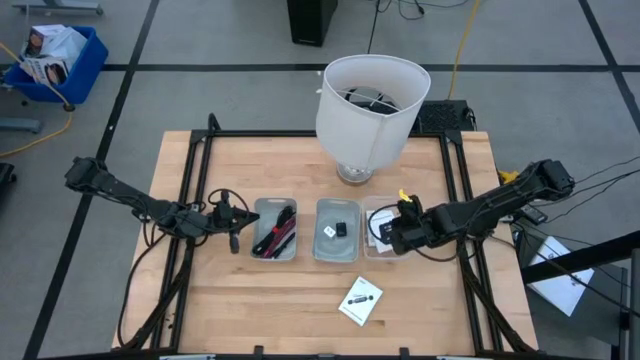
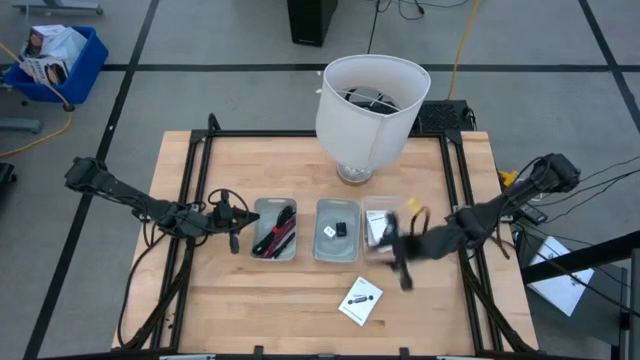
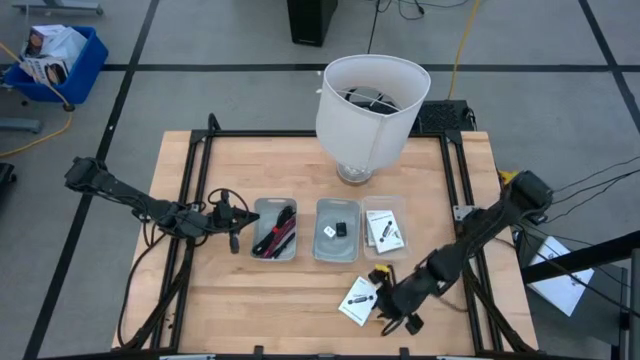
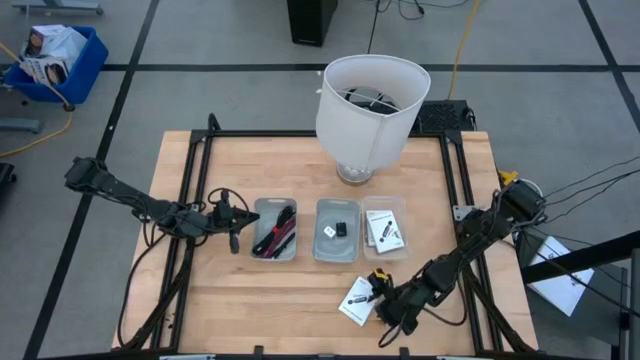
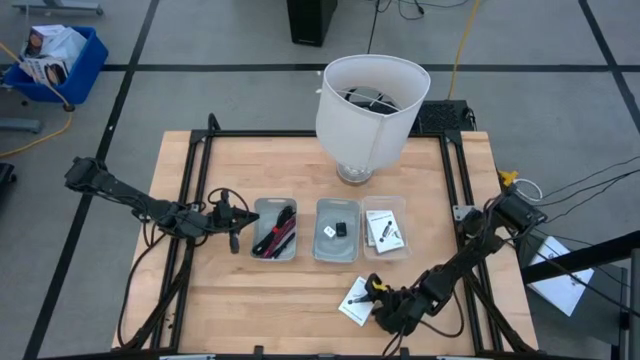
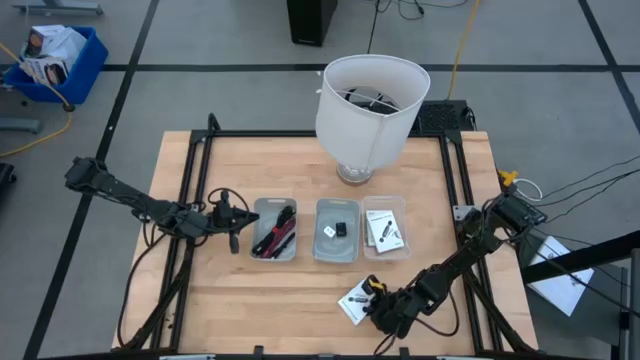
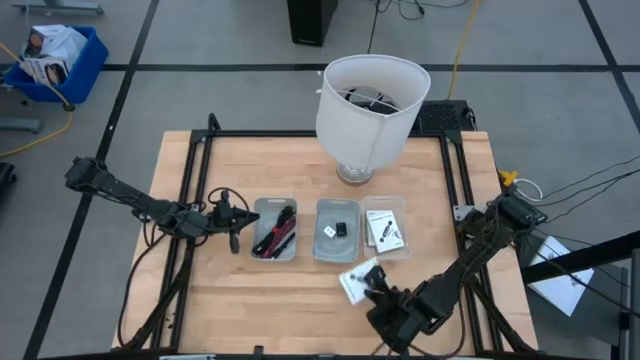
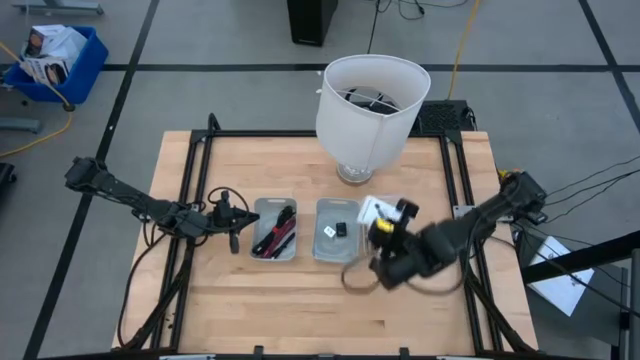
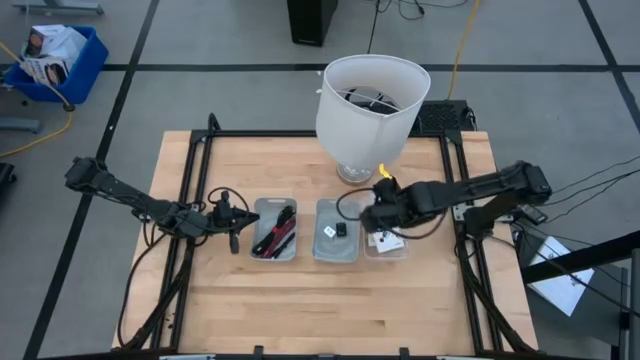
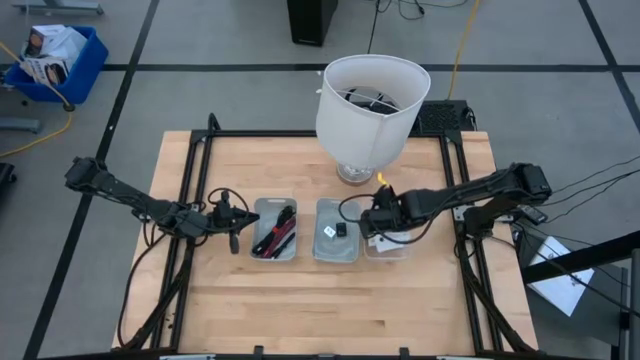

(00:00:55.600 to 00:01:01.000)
Task: Pick and place items into bin
Put the white card reader box into the transparent bin

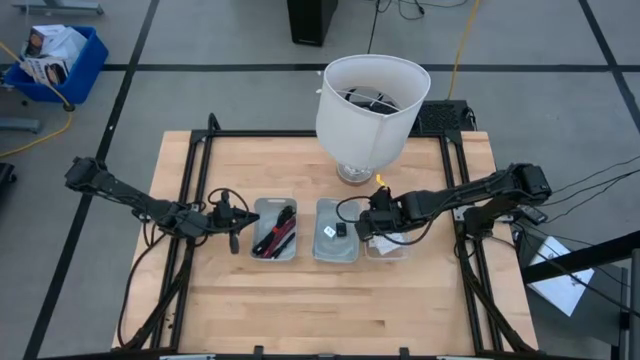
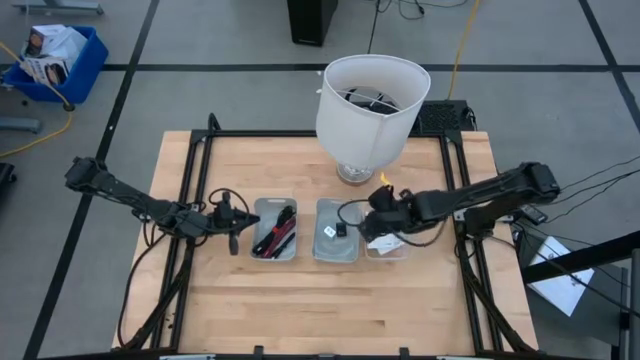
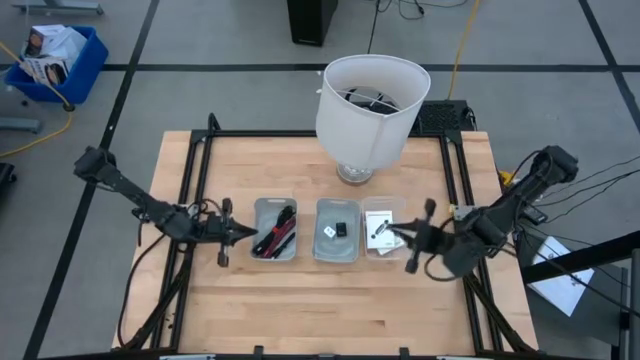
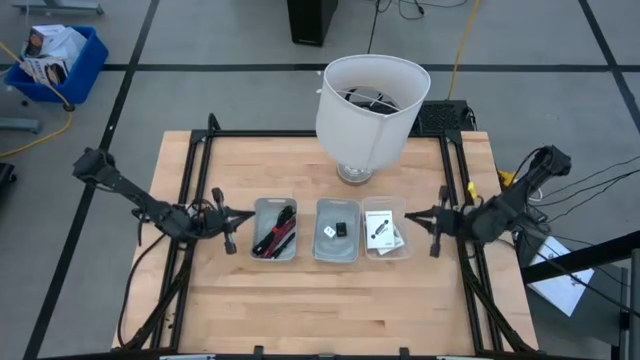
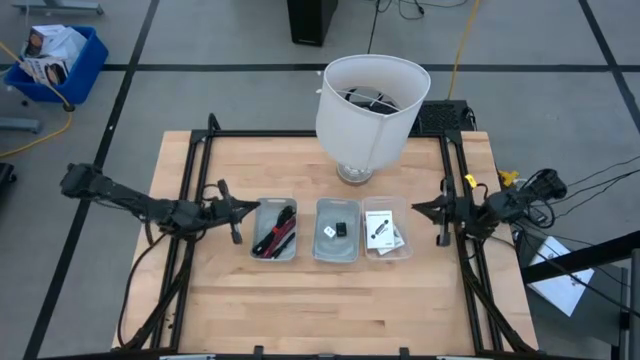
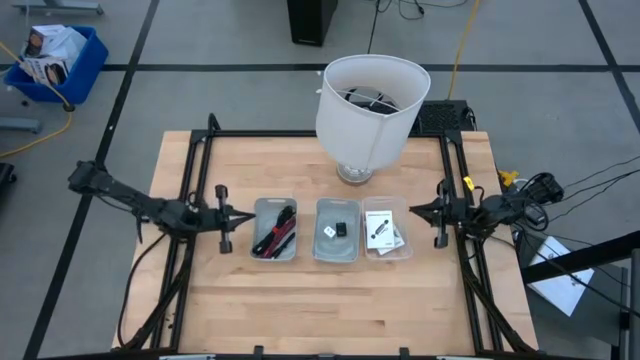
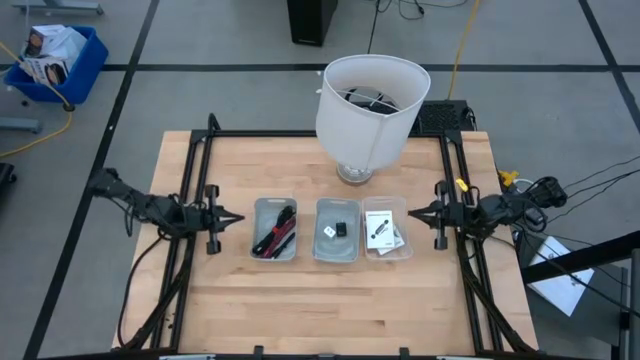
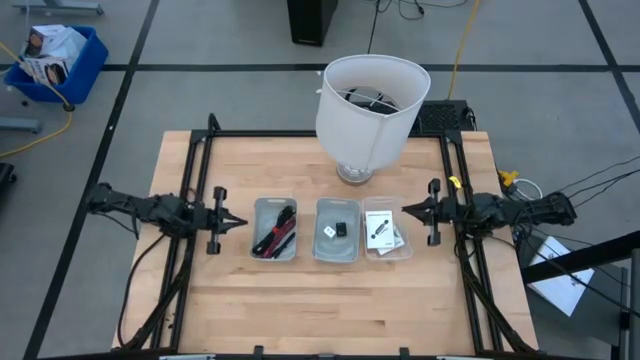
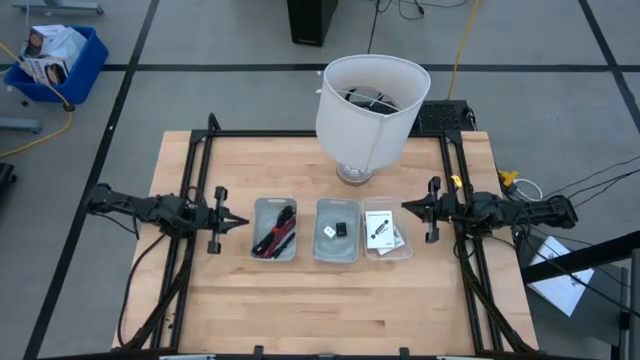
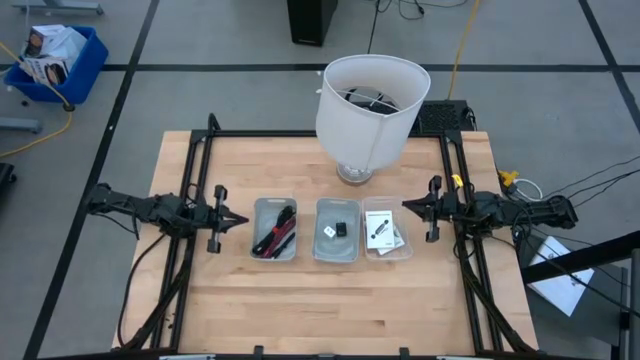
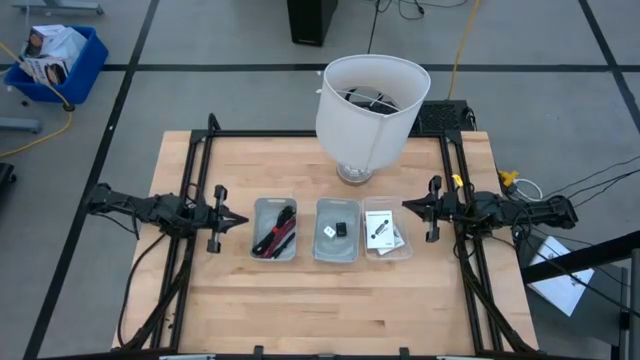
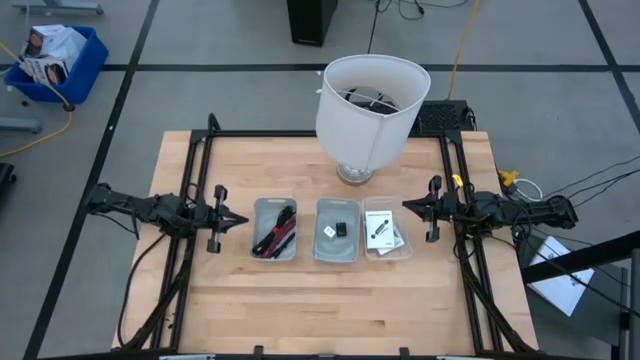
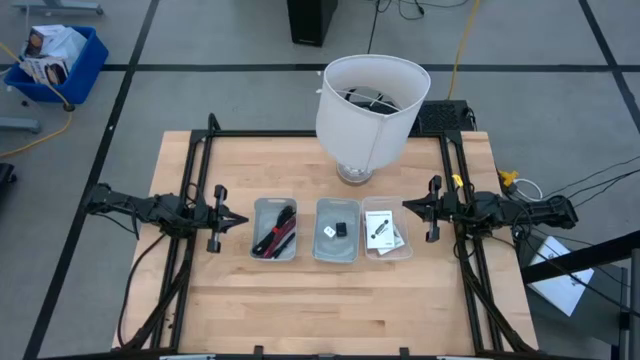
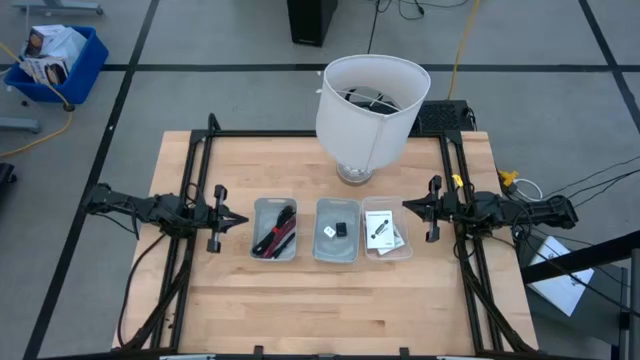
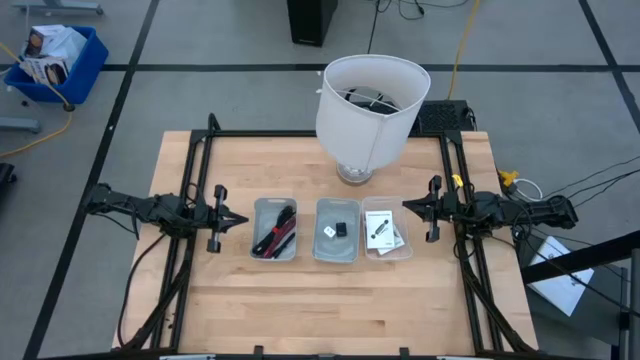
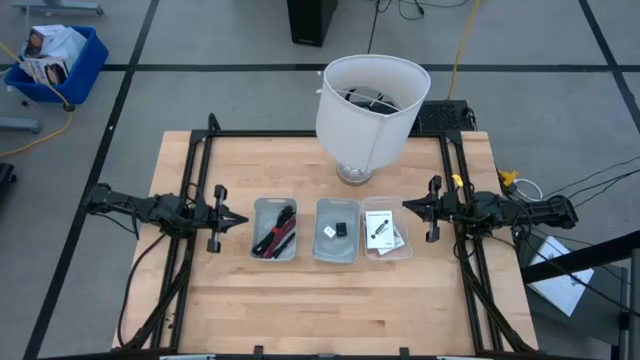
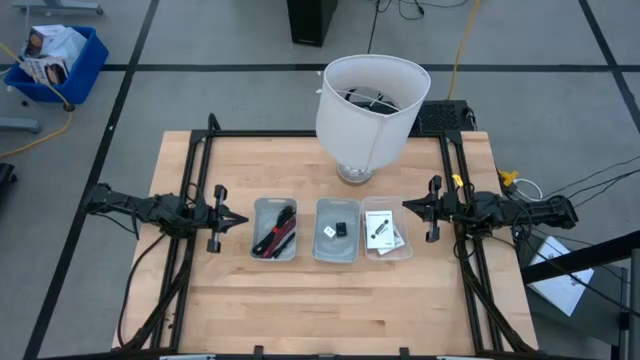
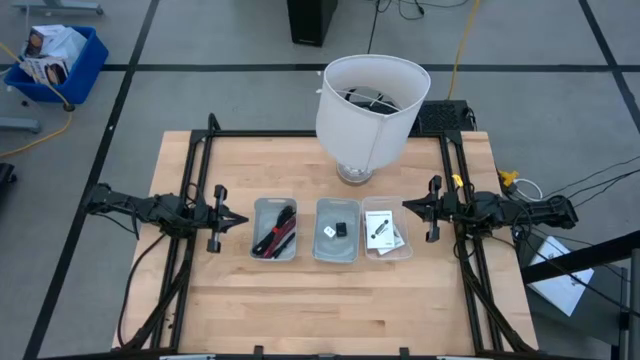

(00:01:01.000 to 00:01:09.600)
Return to Home Position

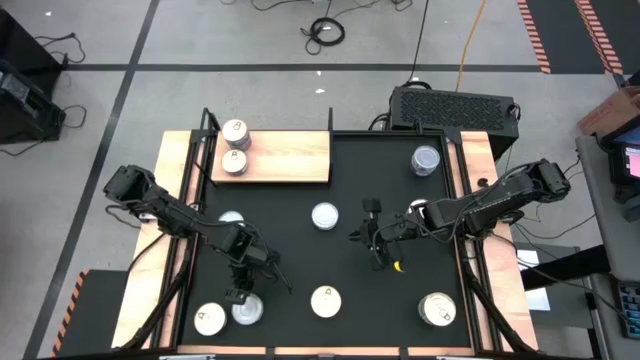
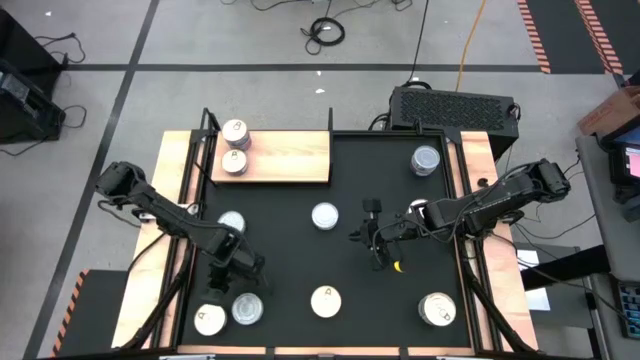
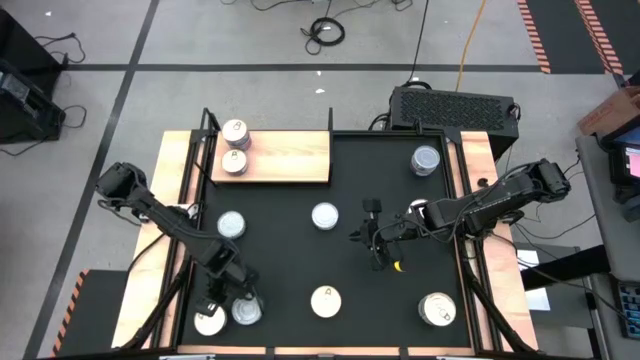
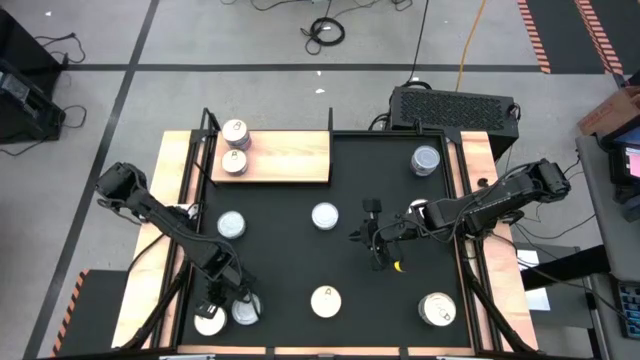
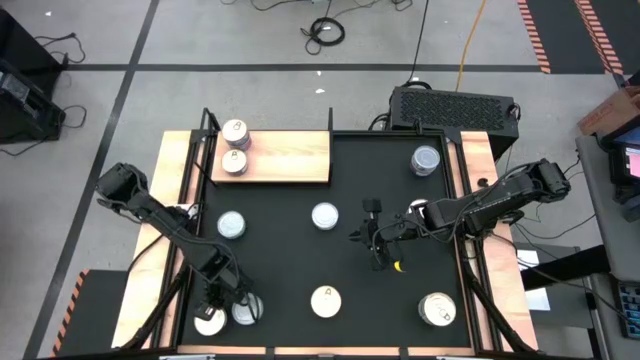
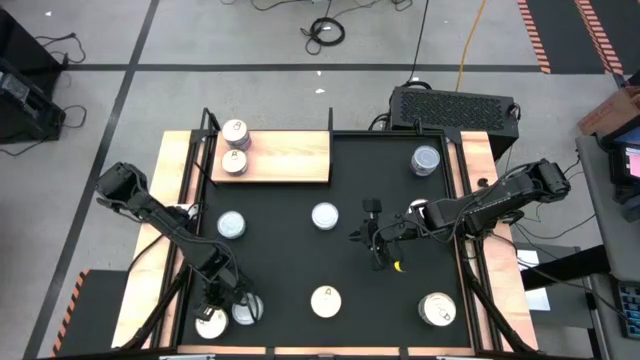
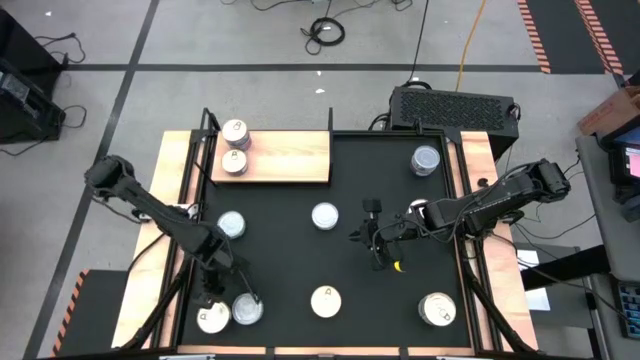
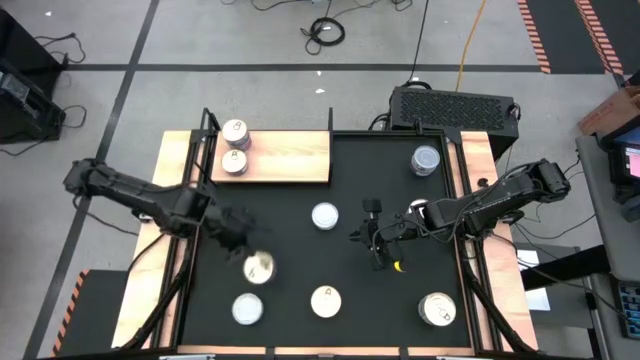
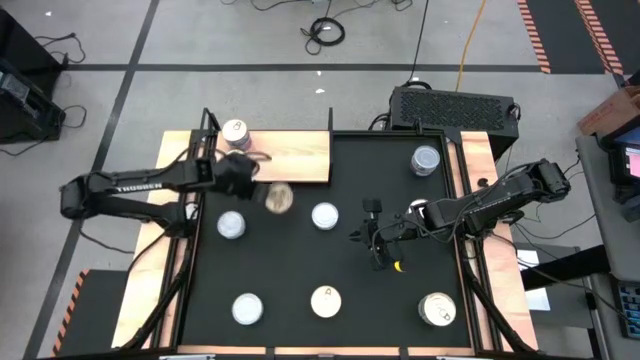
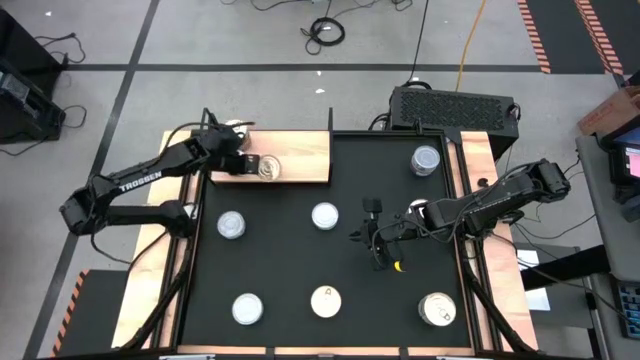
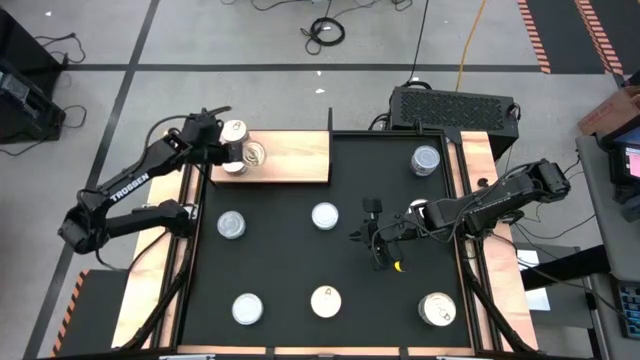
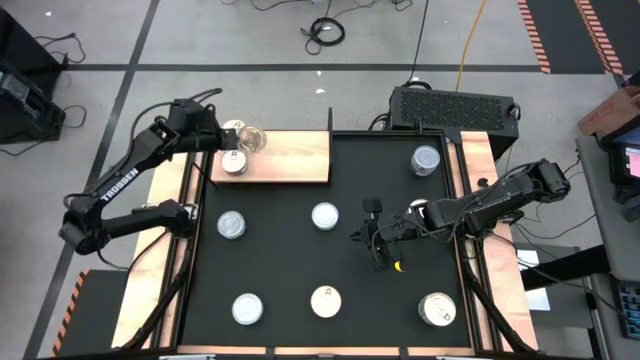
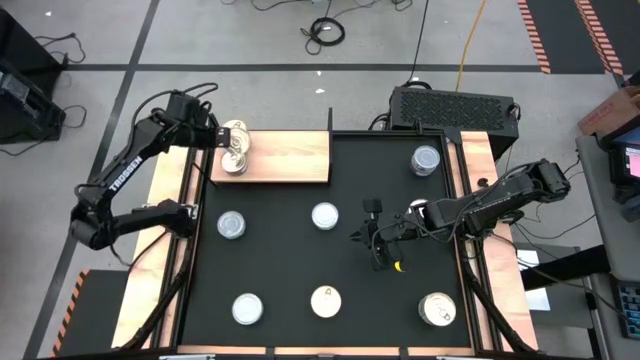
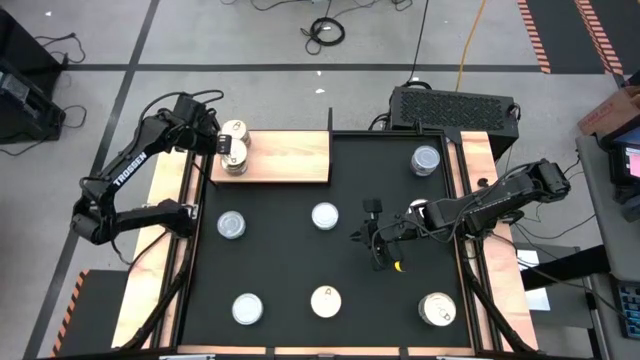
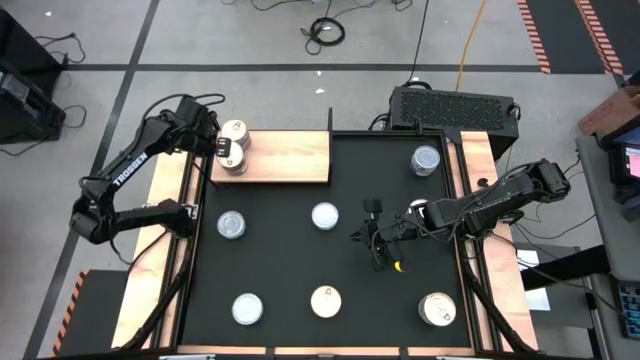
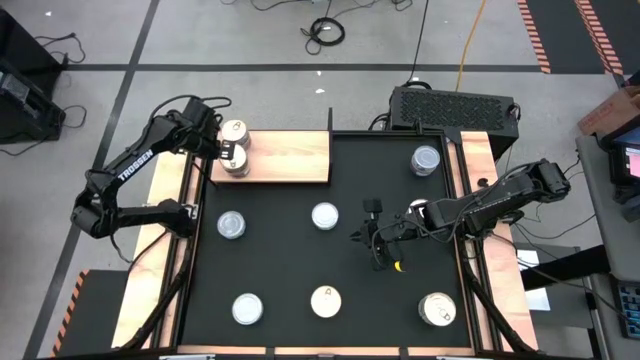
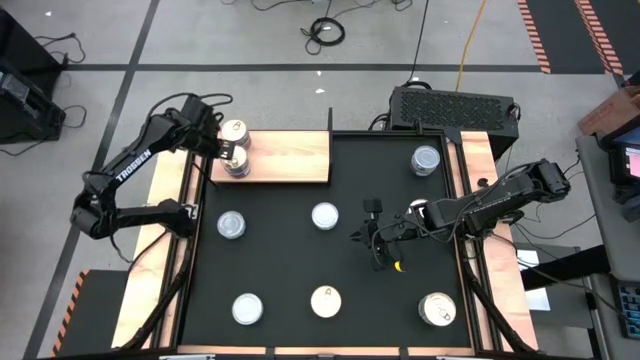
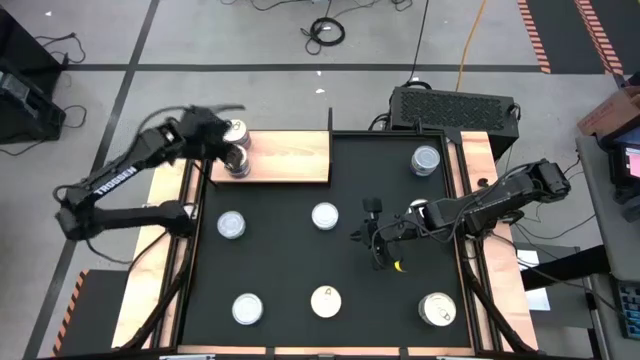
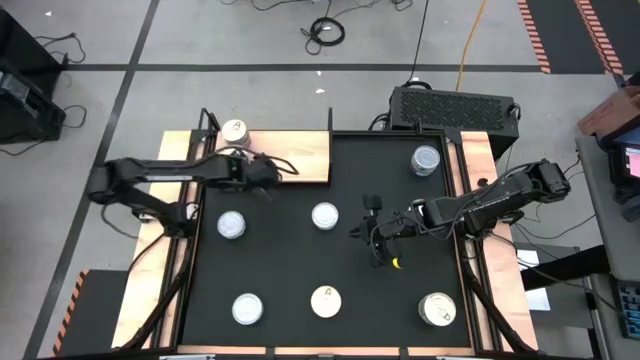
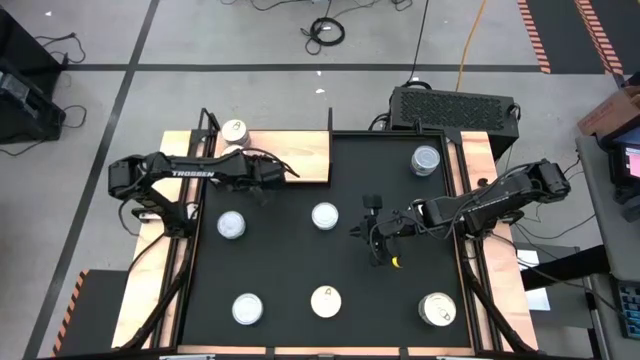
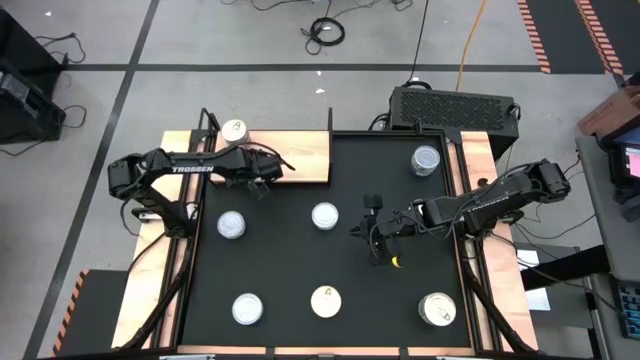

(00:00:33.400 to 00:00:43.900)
Task: Stack canned seafood by type on shelf
Stack the blue tuna can on top of the blue tuna can on the shelf
